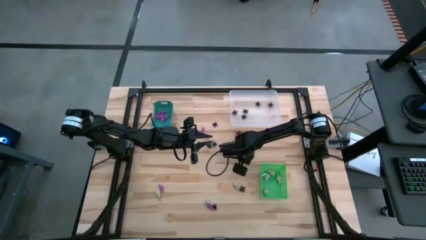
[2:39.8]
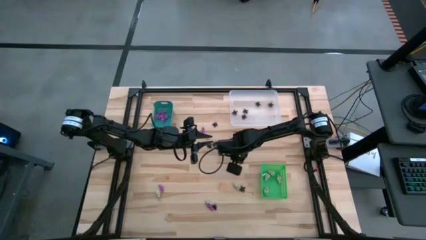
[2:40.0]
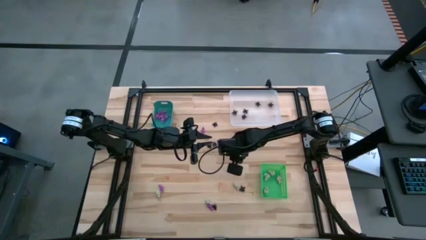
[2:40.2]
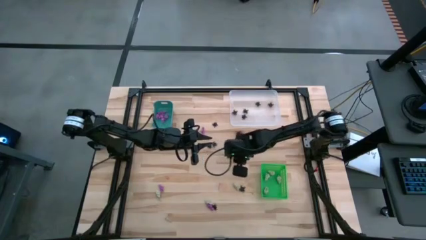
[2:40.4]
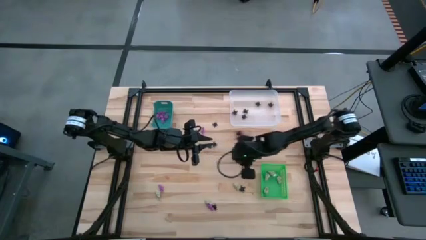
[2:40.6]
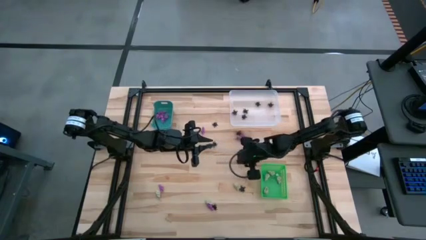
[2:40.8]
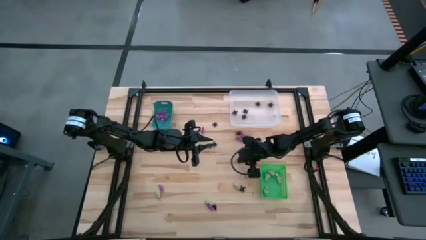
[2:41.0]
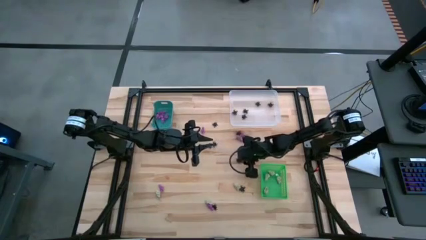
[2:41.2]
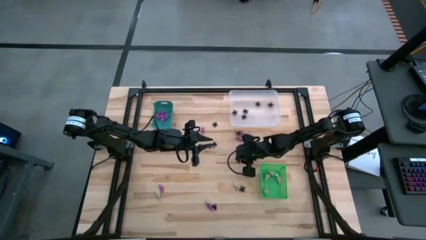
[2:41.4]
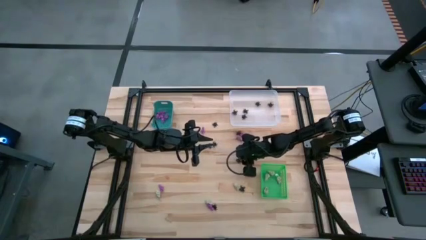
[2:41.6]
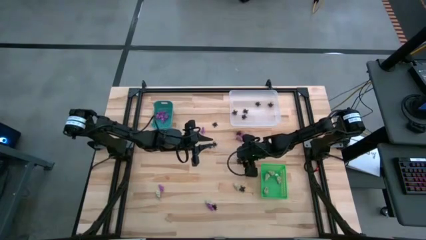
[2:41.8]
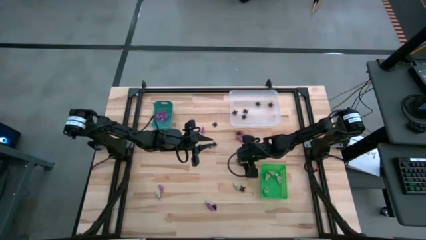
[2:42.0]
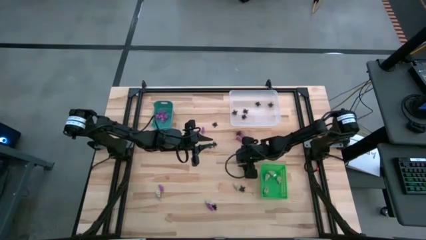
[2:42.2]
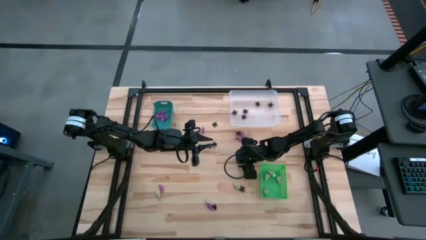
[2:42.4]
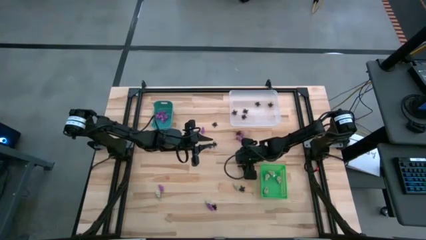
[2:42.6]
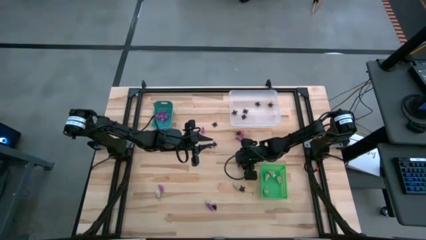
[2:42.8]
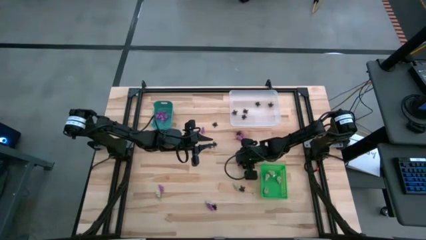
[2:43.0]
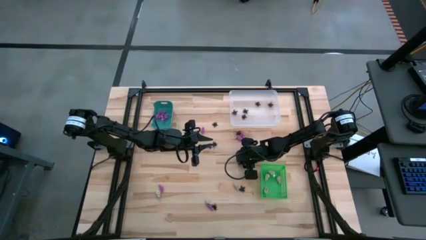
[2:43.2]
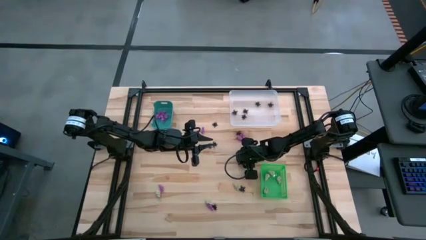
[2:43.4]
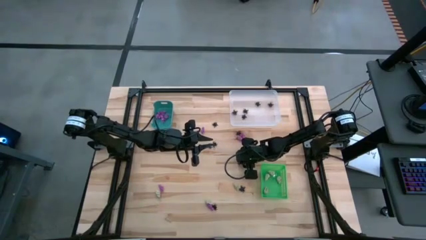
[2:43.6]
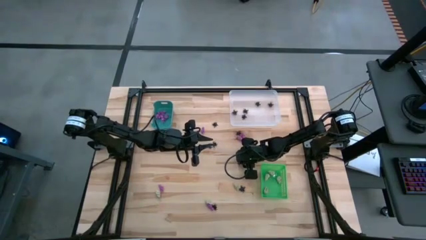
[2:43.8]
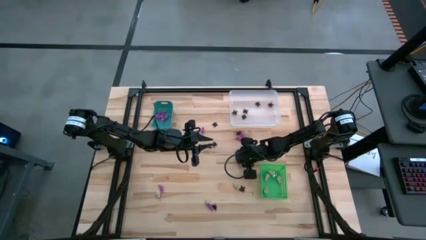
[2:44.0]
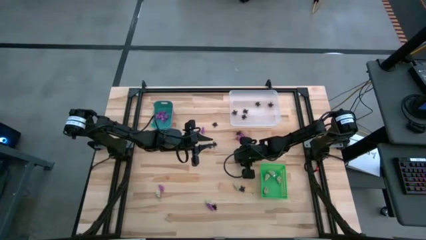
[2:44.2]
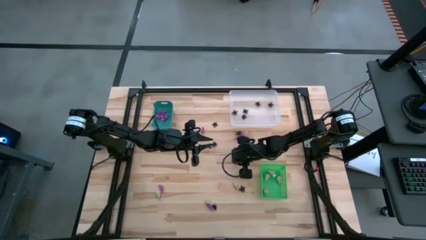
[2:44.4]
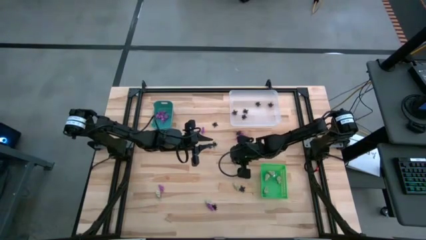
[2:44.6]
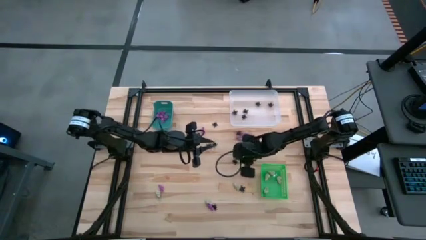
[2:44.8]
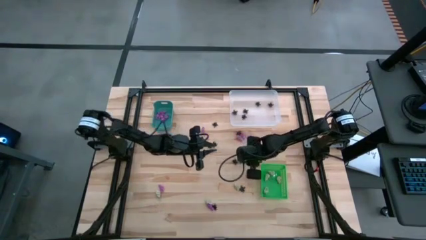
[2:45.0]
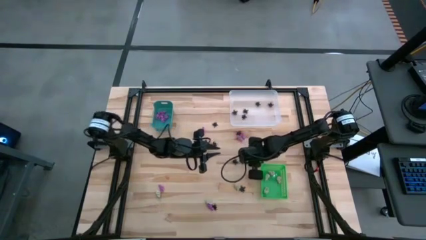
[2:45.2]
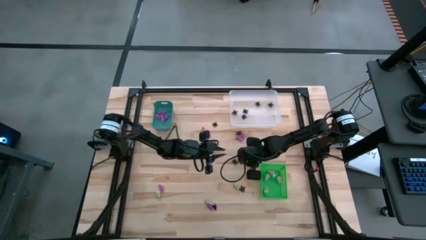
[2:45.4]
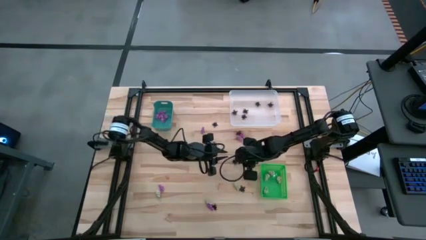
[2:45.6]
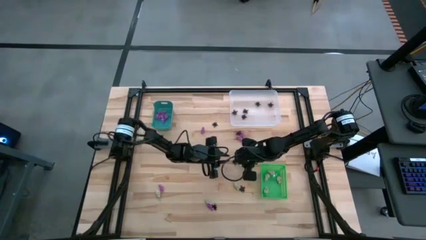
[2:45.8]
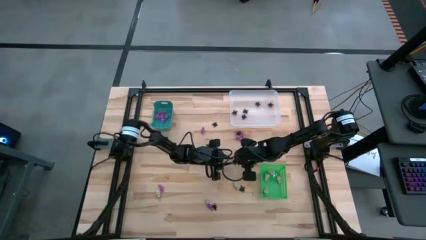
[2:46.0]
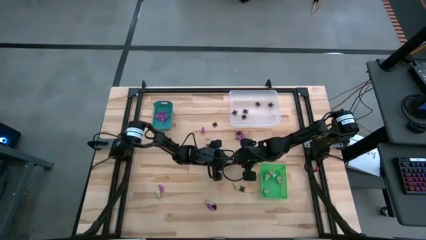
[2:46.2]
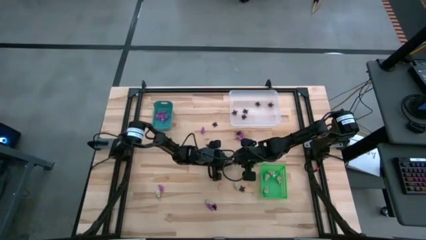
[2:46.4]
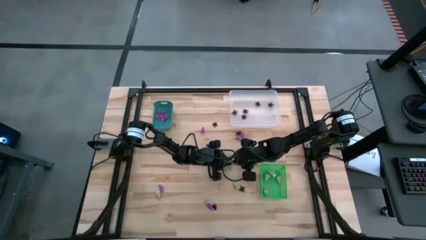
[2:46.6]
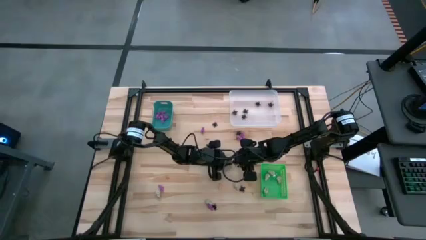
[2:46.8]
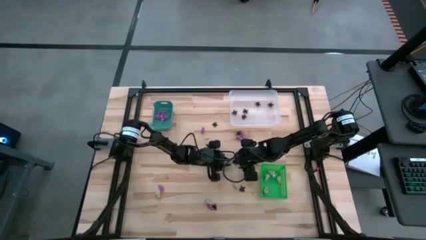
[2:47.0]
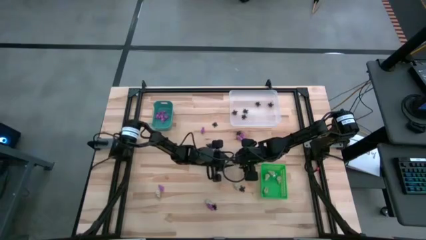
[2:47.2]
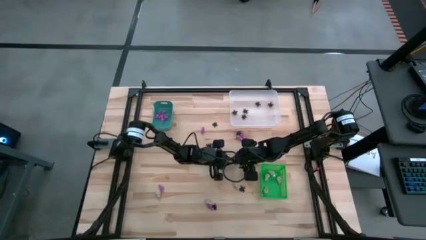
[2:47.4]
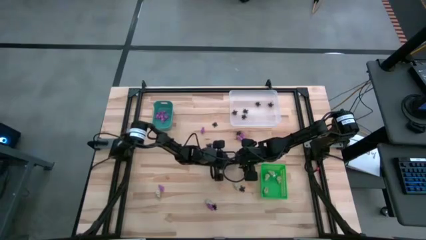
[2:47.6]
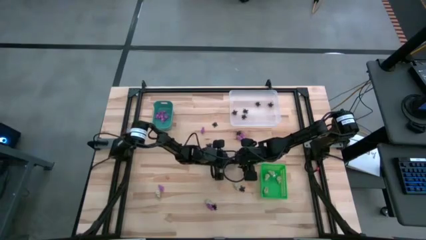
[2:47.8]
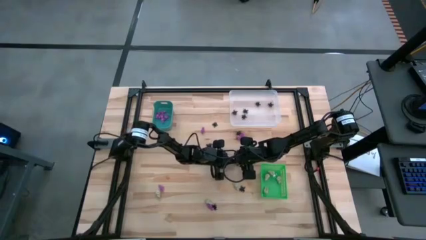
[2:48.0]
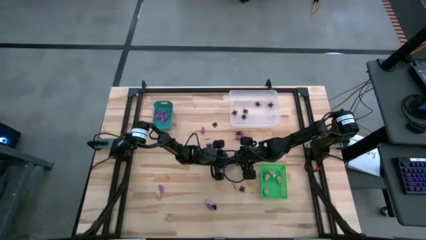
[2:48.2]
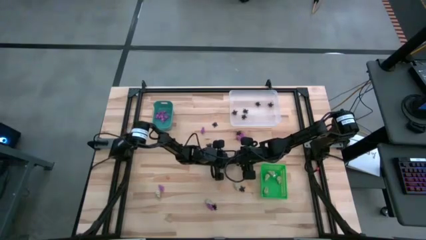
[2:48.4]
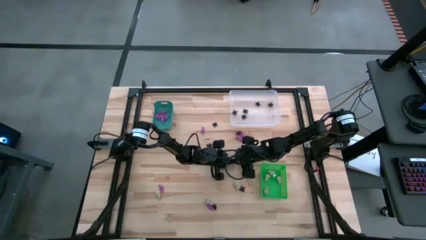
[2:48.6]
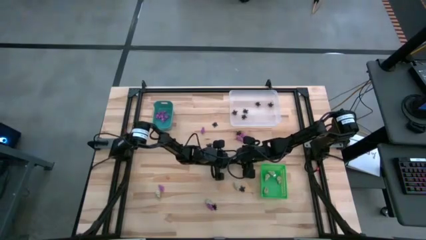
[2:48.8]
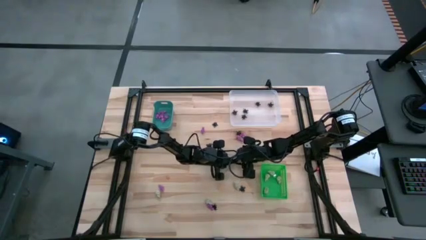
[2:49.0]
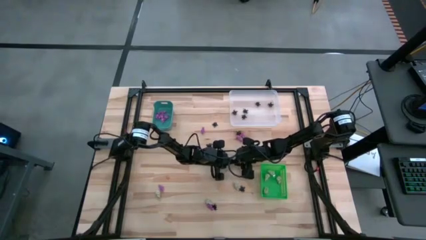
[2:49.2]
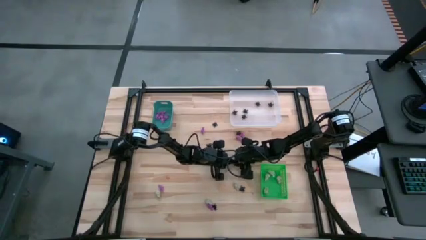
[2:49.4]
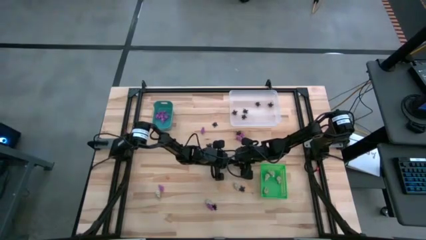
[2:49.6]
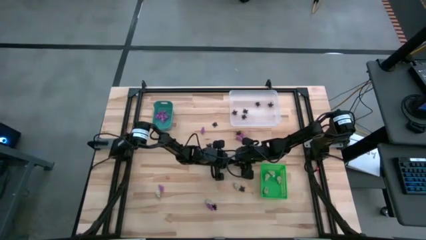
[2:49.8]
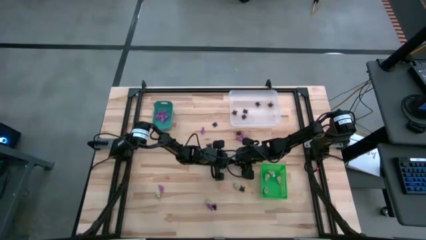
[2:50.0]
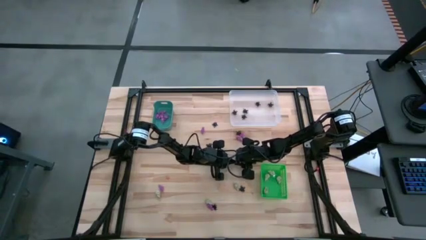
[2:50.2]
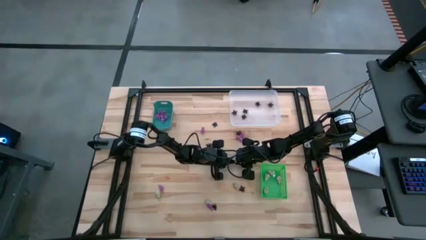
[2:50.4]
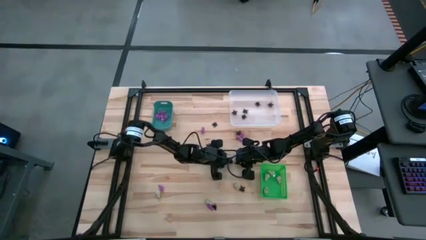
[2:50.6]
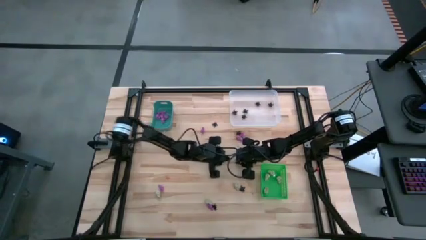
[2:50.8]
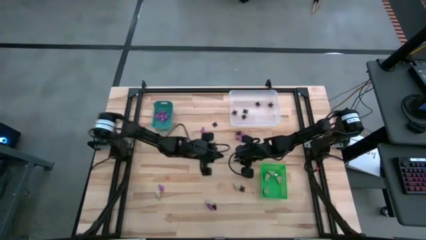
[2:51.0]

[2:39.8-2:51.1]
Task: Sort Halloween decoration
Put the black spider toy into the white bin
